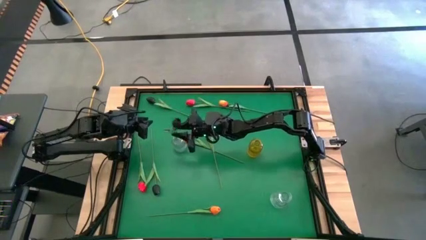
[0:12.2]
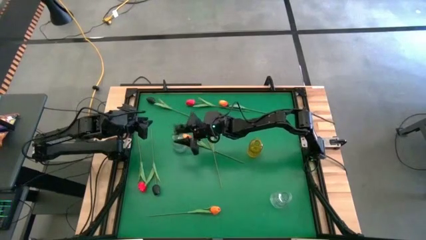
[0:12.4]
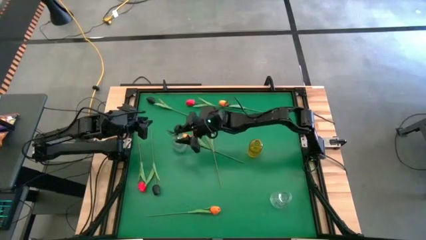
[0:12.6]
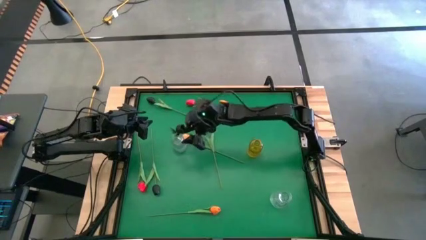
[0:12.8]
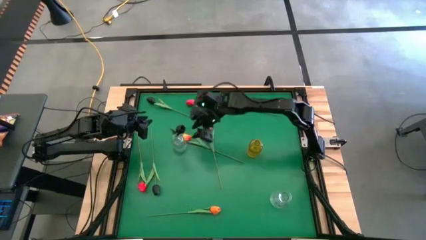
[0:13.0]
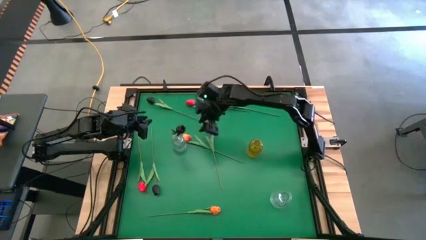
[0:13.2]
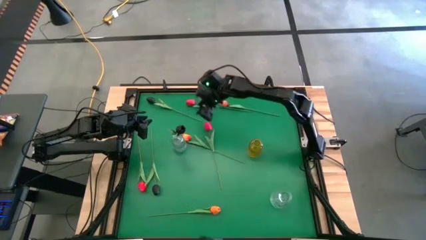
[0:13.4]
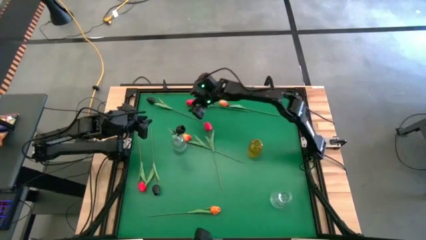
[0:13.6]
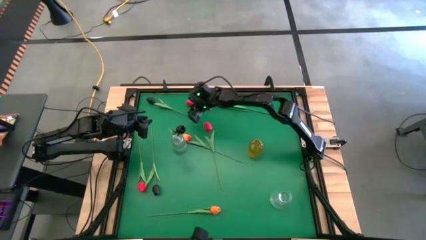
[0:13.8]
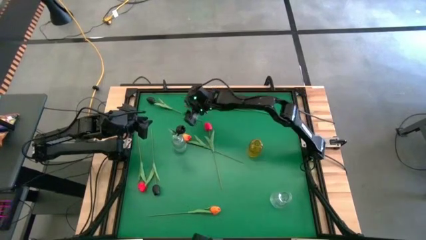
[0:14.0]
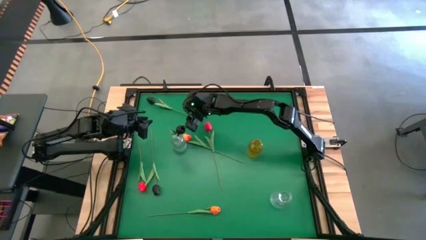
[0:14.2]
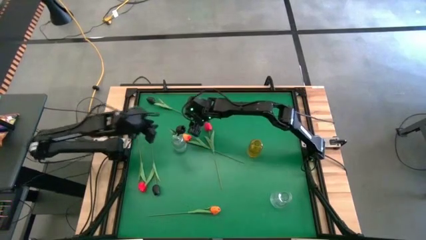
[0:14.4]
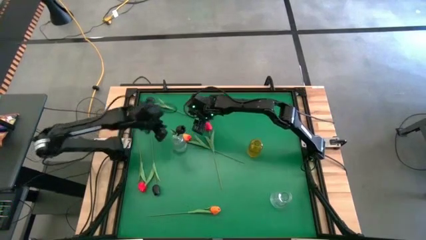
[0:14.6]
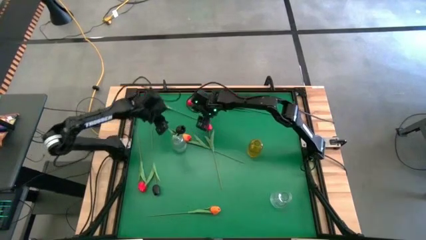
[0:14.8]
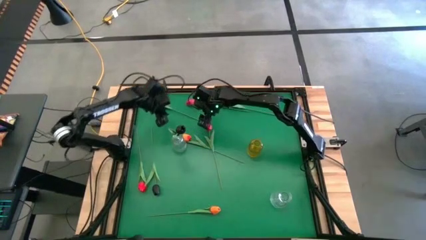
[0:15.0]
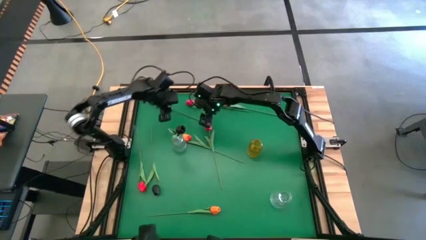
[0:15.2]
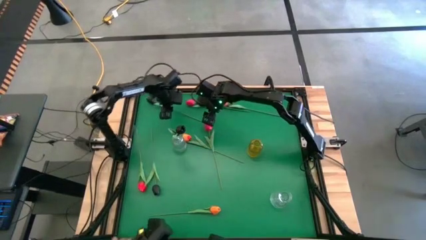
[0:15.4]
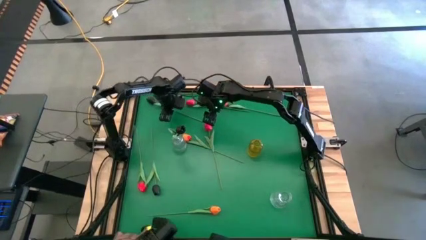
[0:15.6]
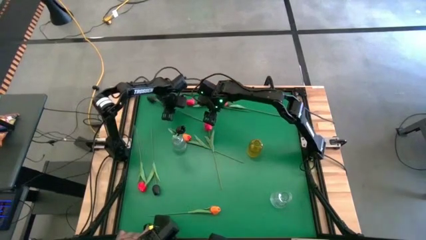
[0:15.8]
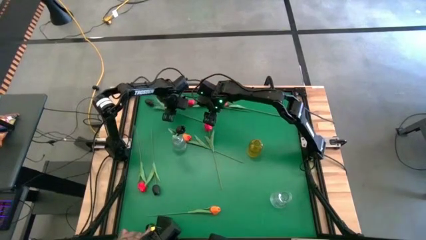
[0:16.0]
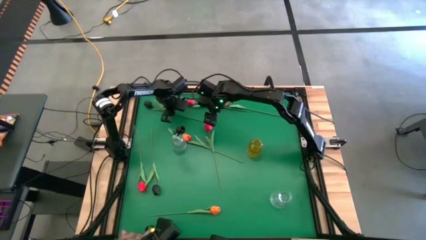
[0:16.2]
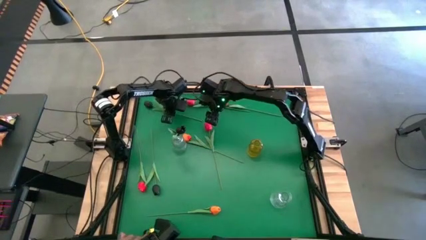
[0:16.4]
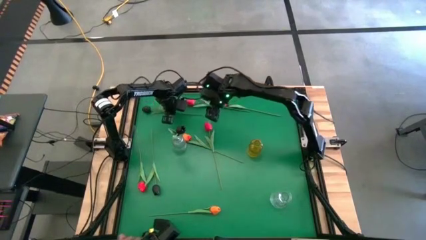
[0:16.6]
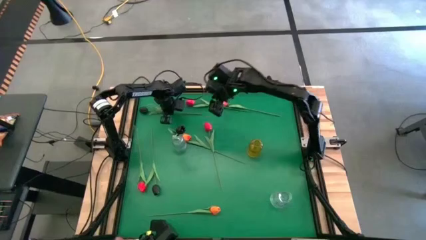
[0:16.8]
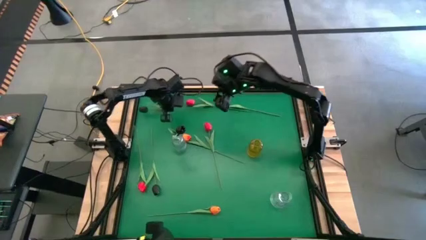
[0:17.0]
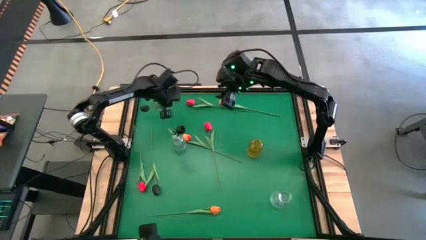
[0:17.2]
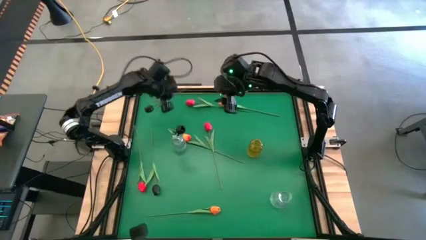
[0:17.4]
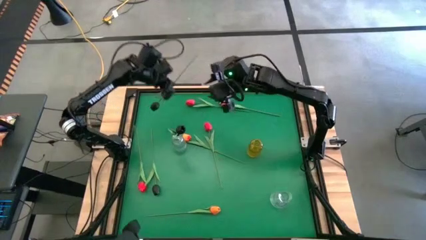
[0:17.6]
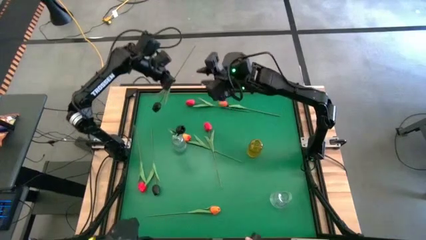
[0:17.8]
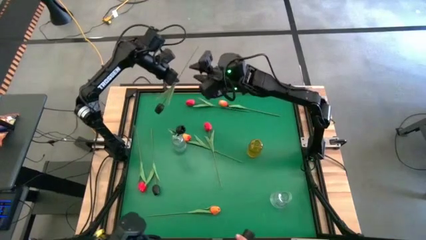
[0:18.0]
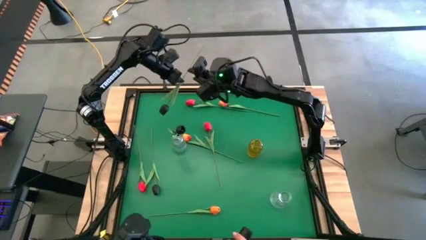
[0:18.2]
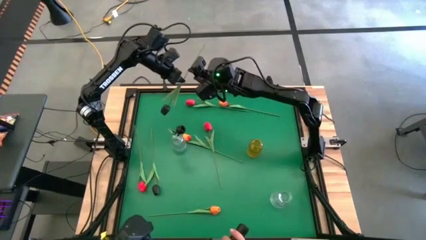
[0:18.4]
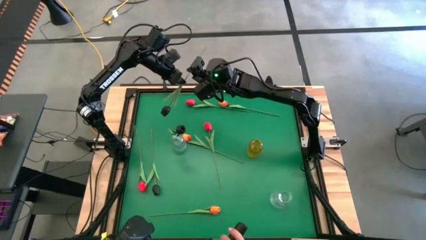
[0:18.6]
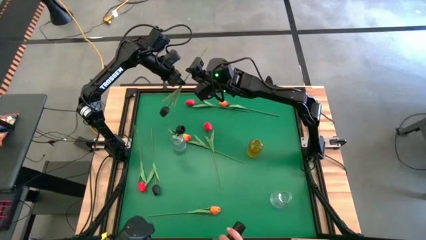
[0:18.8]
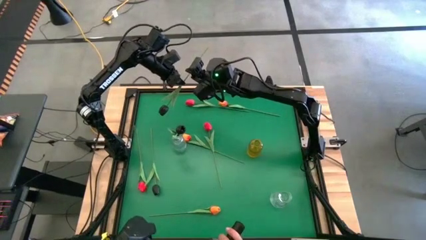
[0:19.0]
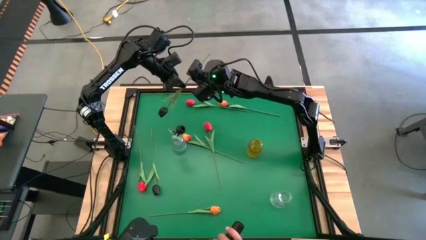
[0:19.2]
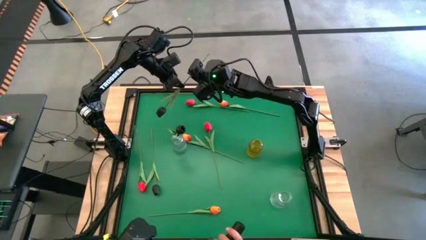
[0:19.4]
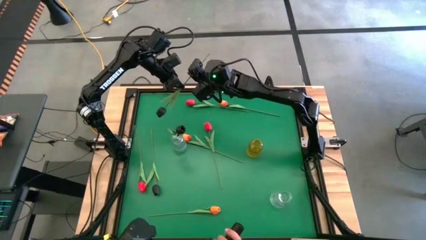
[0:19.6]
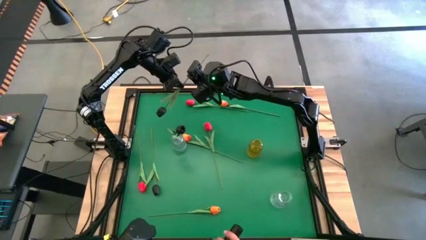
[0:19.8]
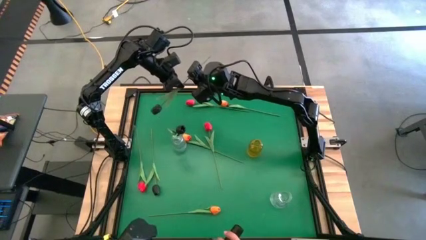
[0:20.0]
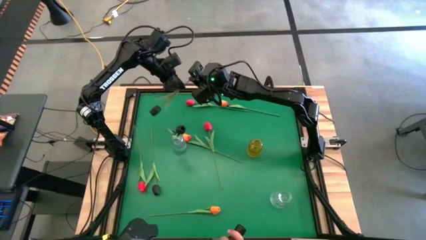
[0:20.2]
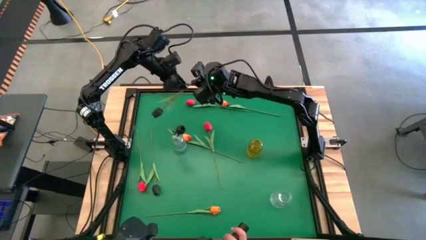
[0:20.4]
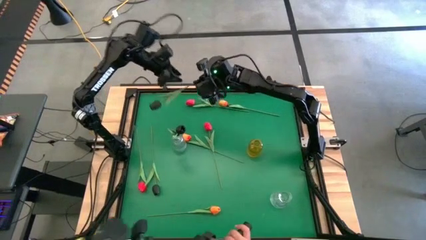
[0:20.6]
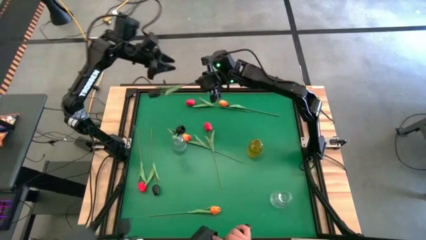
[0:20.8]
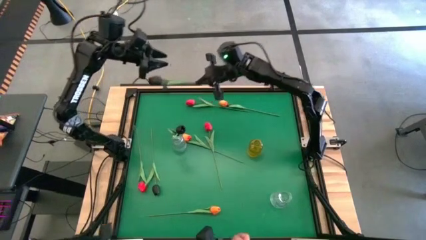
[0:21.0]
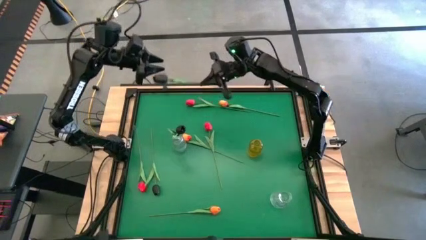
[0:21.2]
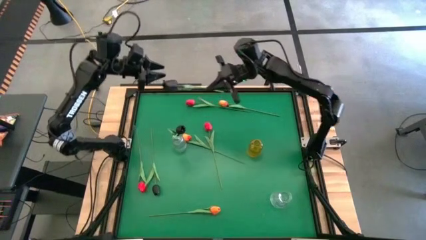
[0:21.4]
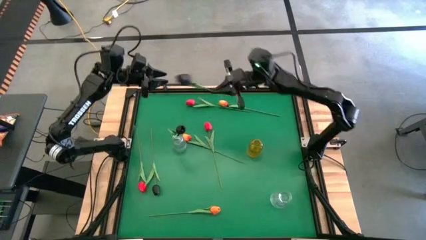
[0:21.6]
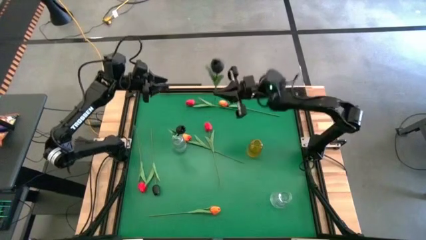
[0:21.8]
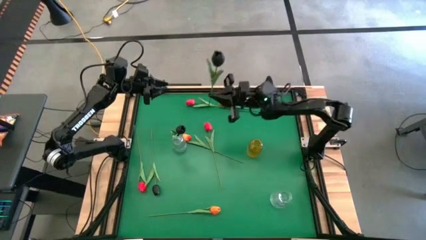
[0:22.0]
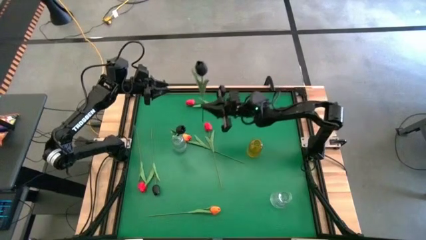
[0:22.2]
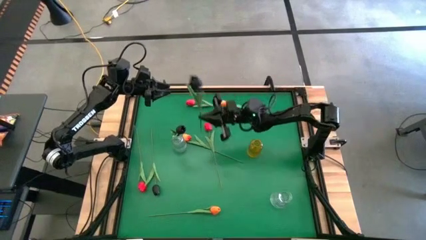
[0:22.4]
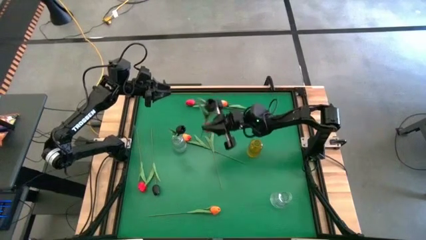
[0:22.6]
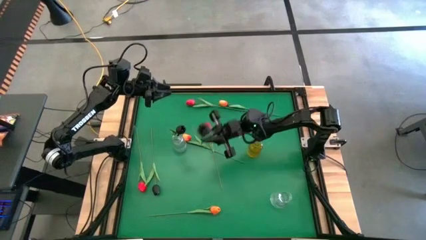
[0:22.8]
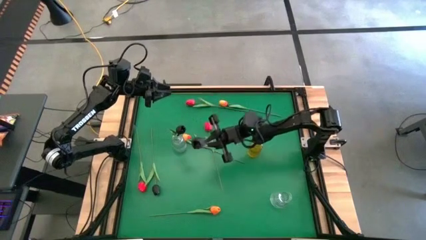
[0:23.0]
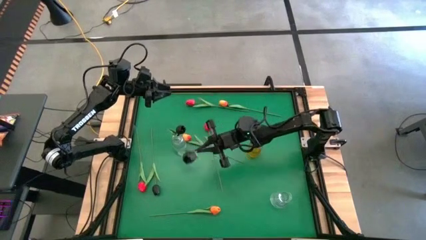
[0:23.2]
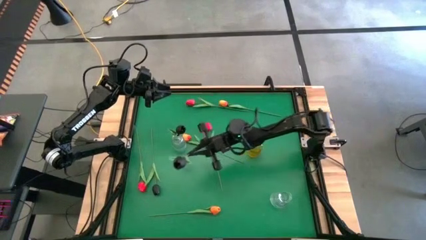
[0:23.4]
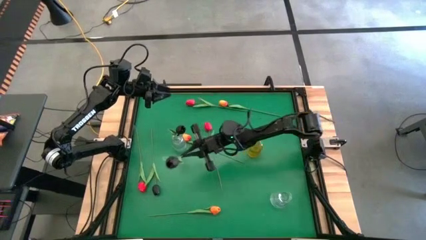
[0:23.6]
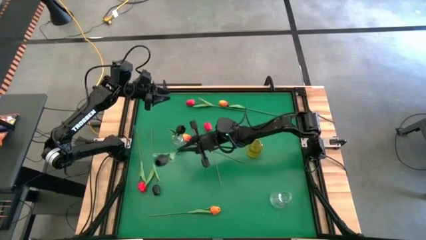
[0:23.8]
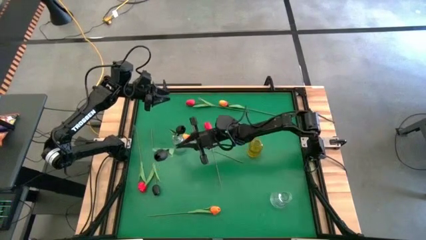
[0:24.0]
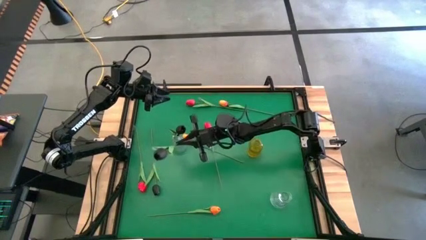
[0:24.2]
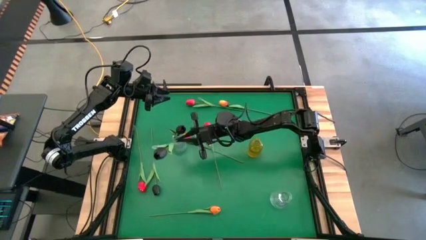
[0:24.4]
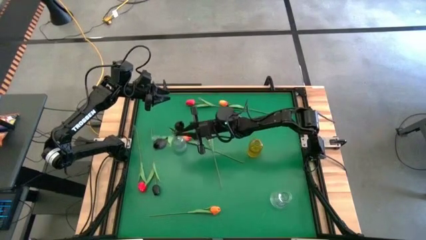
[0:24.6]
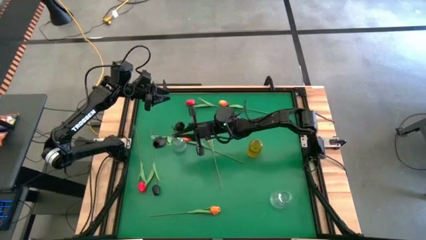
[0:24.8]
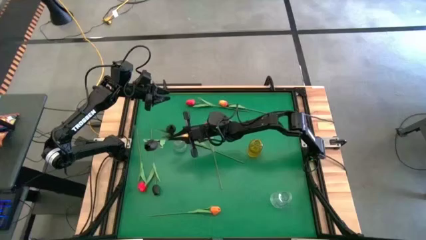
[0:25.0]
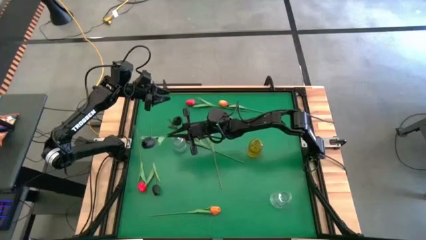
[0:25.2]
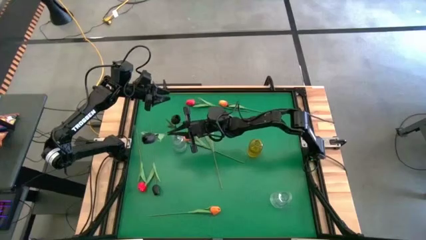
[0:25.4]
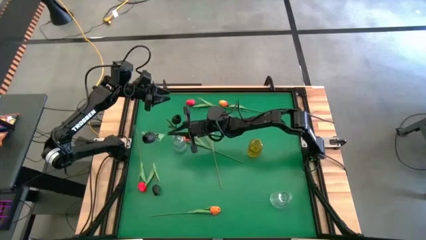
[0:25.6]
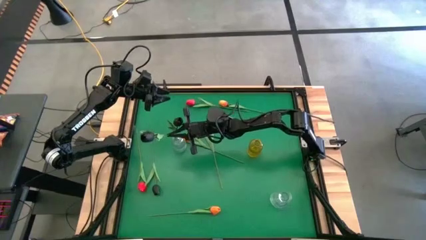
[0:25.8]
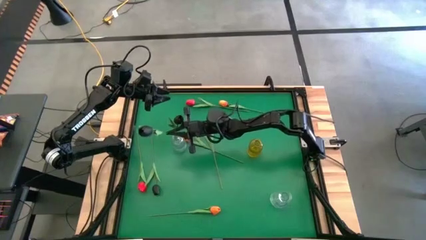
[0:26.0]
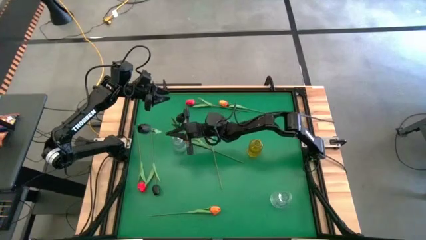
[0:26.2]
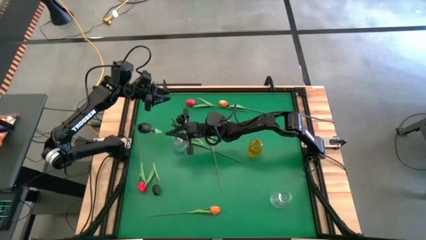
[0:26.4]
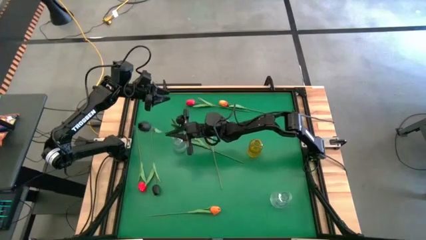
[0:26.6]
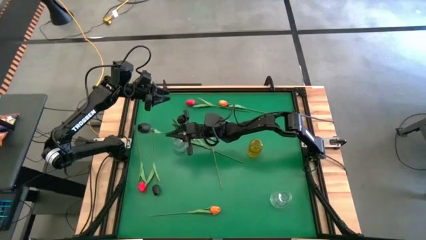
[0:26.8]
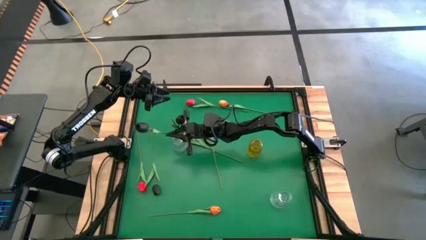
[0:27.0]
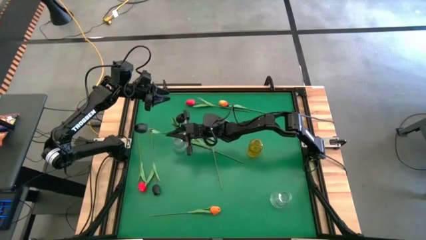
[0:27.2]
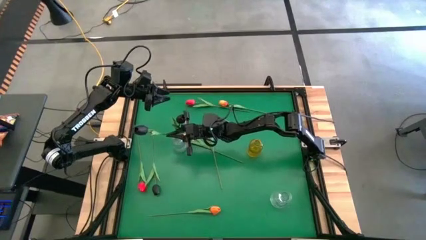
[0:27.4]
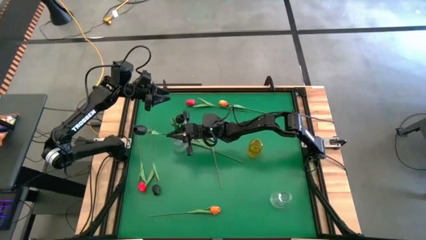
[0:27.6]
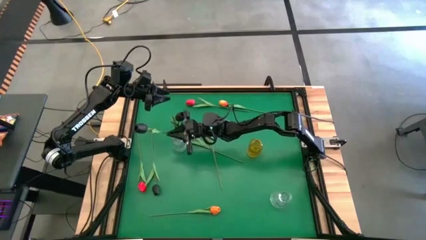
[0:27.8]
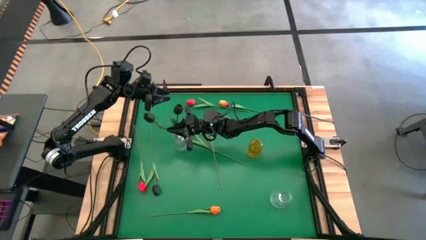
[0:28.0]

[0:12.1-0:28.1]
Task: Sort flowers into vase by color
Put the top black tulip into the top transparent vase
